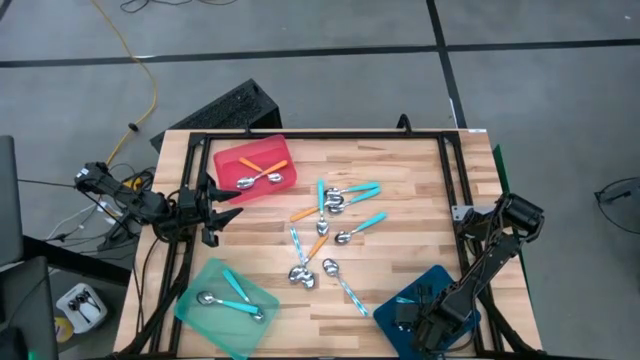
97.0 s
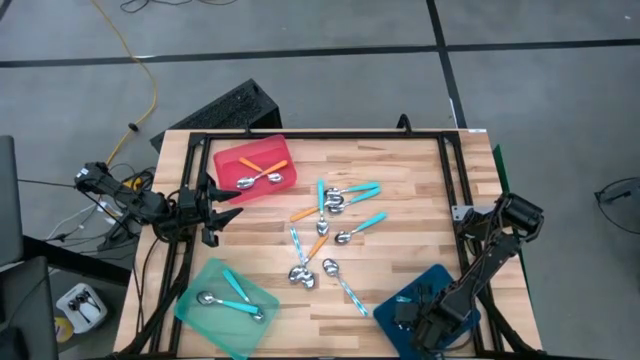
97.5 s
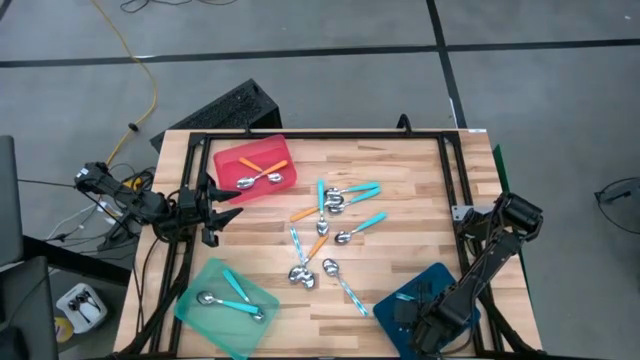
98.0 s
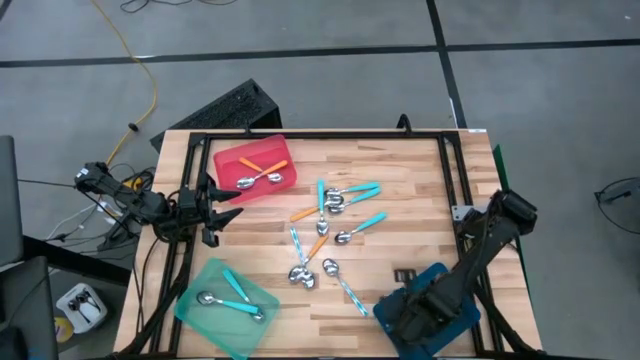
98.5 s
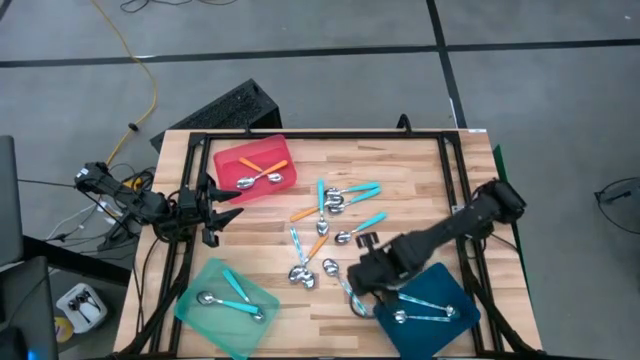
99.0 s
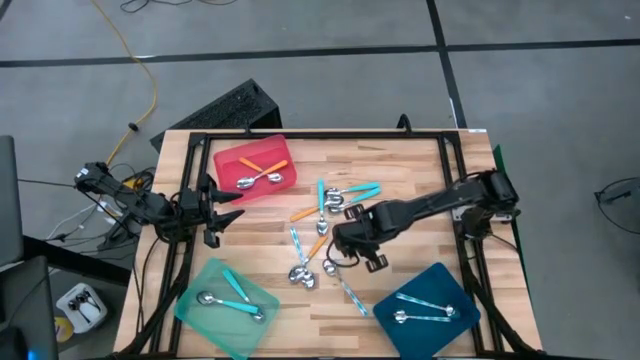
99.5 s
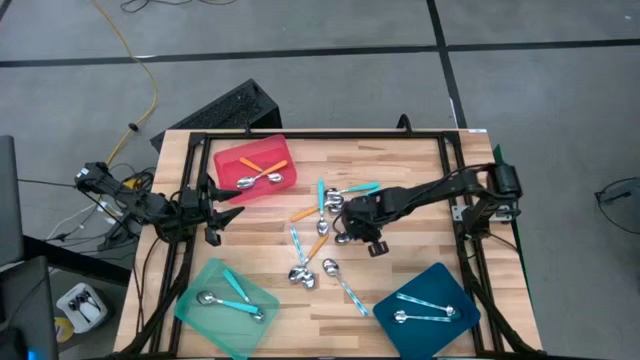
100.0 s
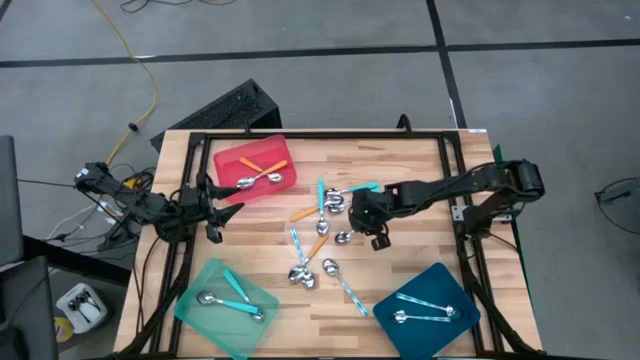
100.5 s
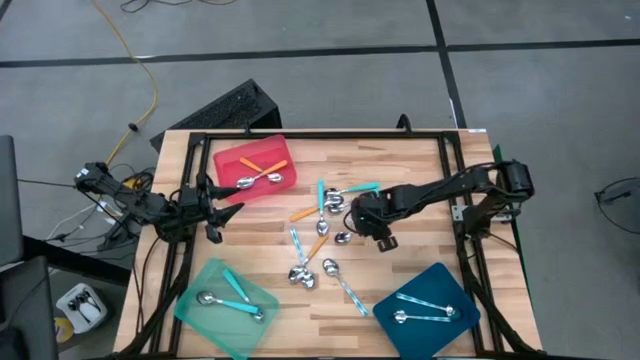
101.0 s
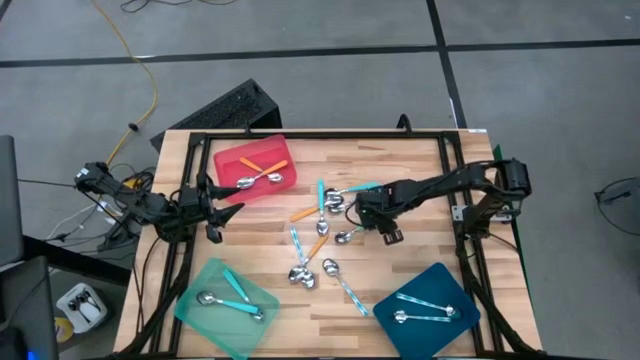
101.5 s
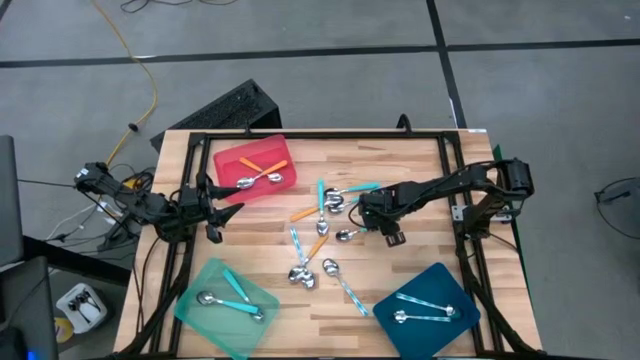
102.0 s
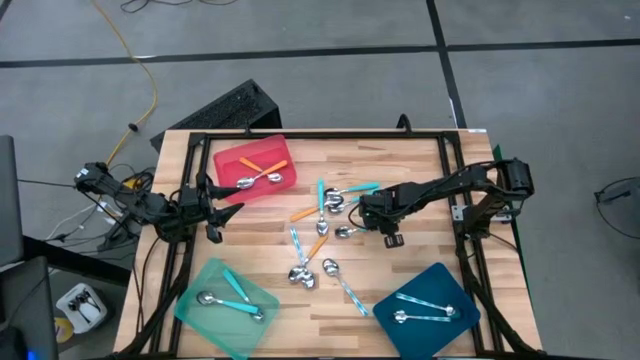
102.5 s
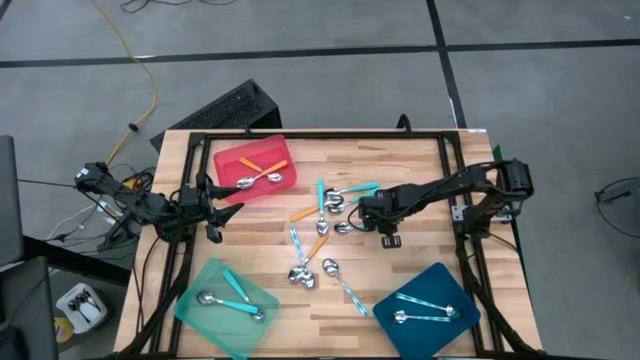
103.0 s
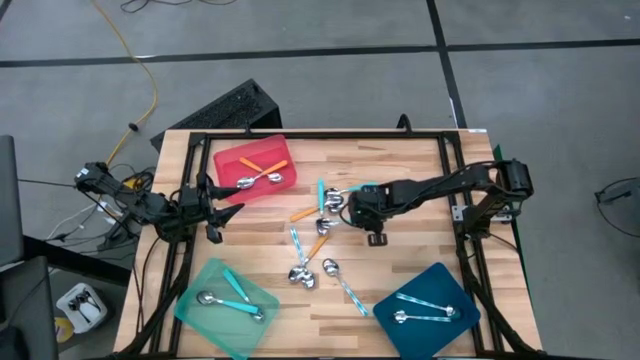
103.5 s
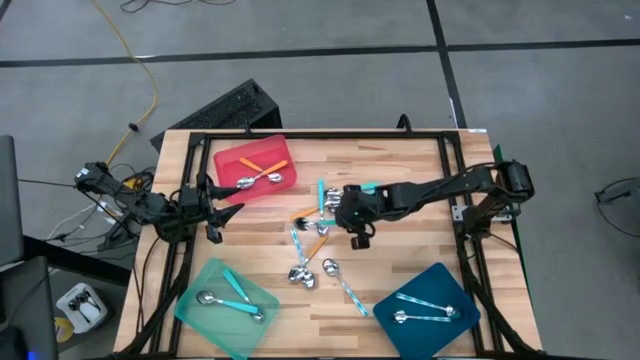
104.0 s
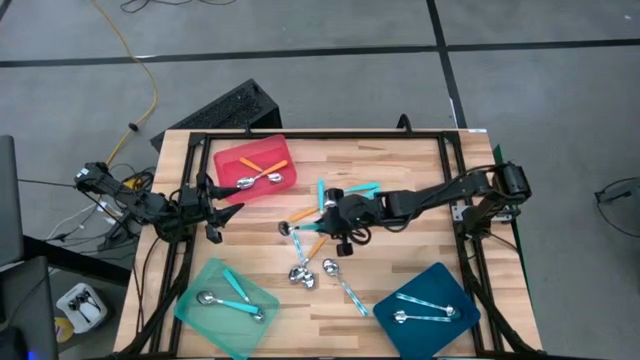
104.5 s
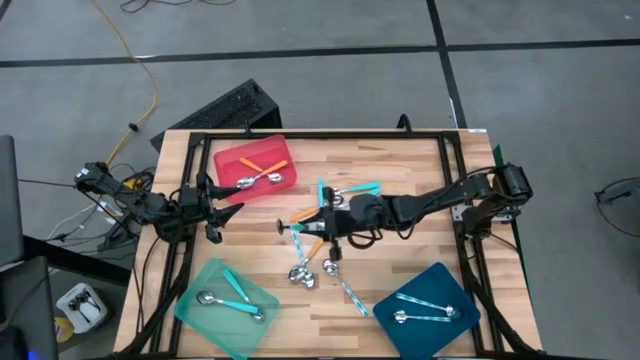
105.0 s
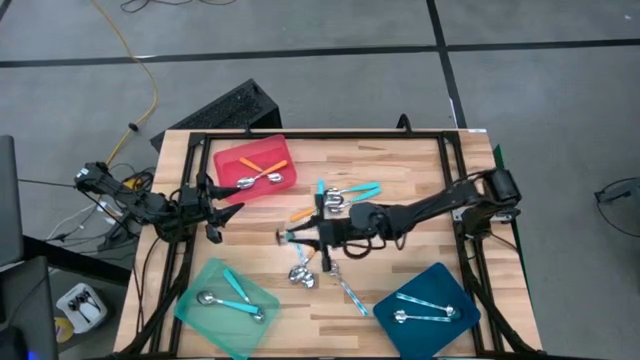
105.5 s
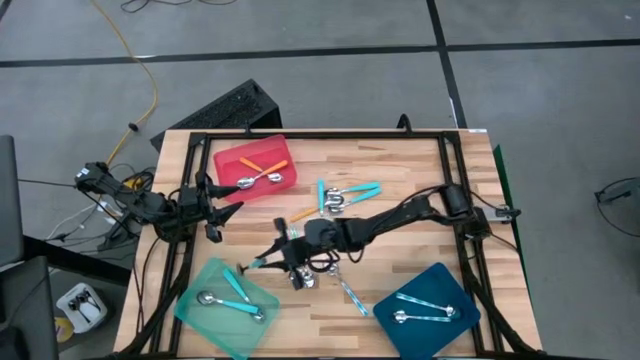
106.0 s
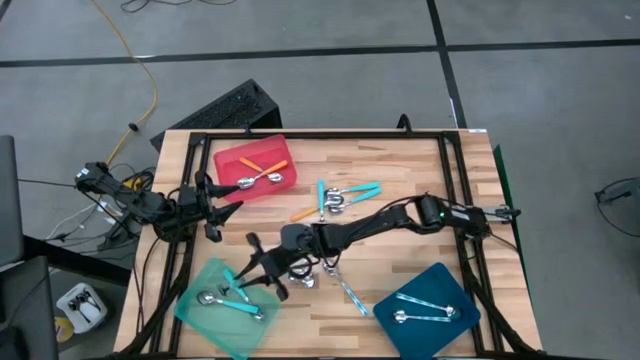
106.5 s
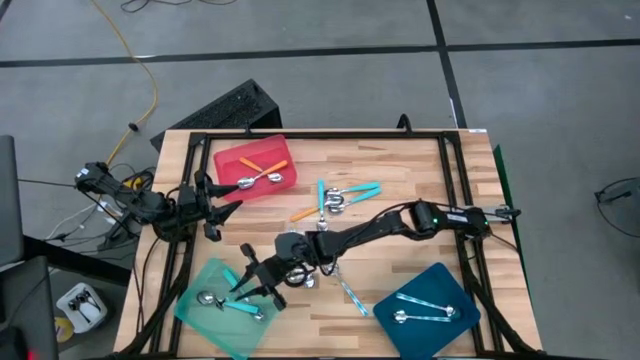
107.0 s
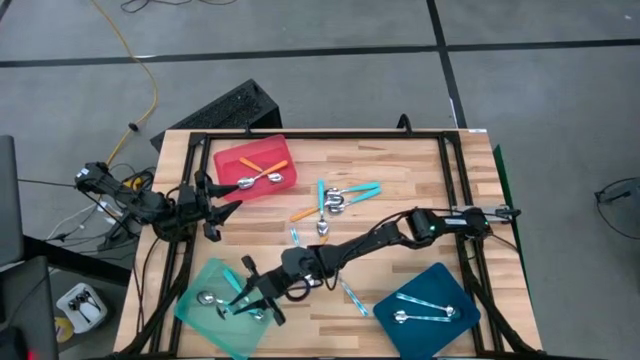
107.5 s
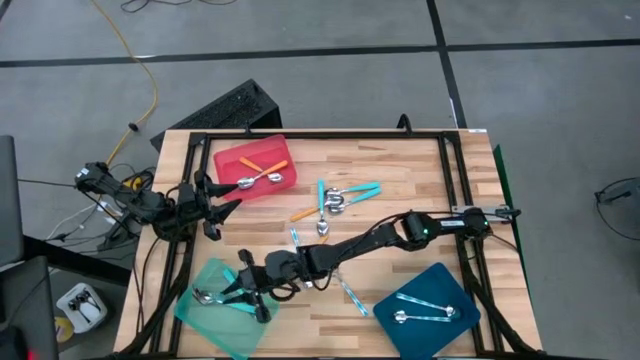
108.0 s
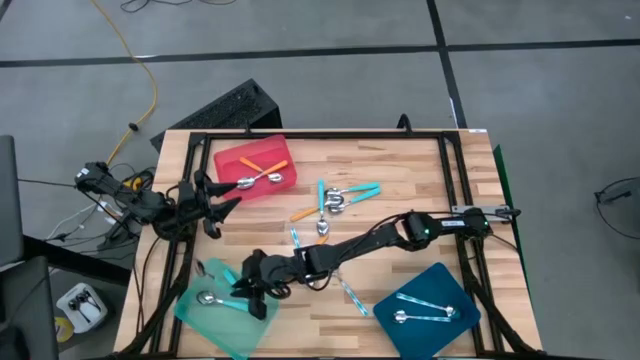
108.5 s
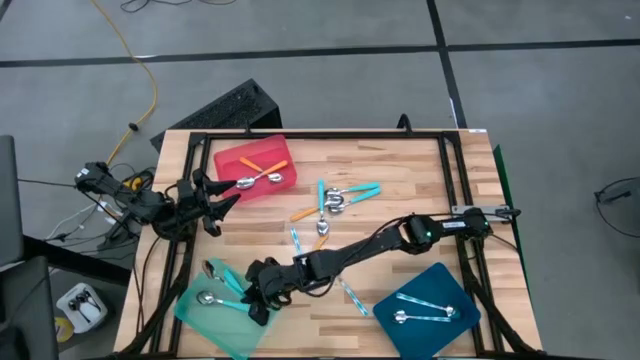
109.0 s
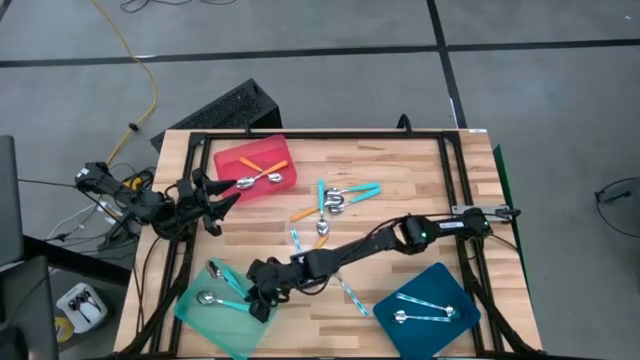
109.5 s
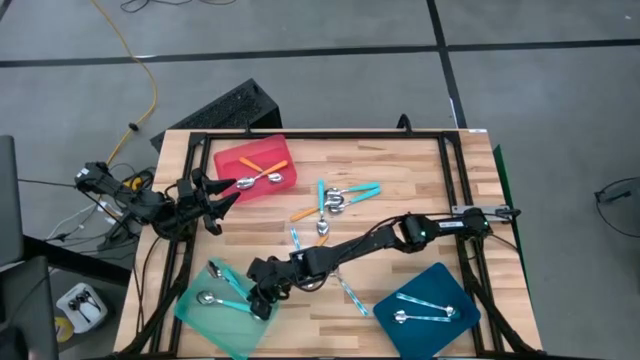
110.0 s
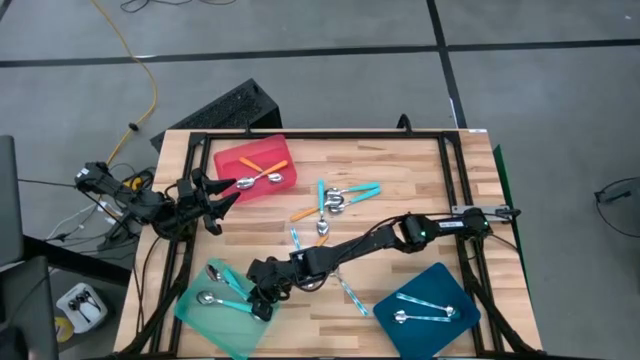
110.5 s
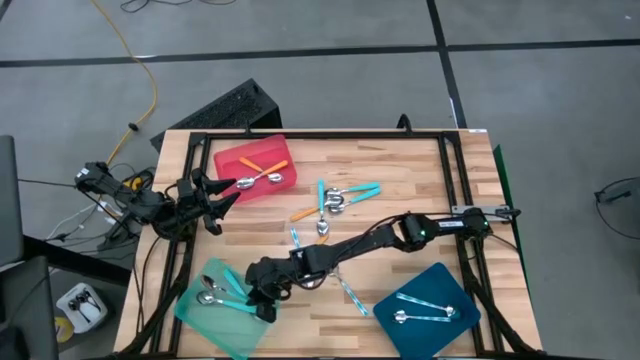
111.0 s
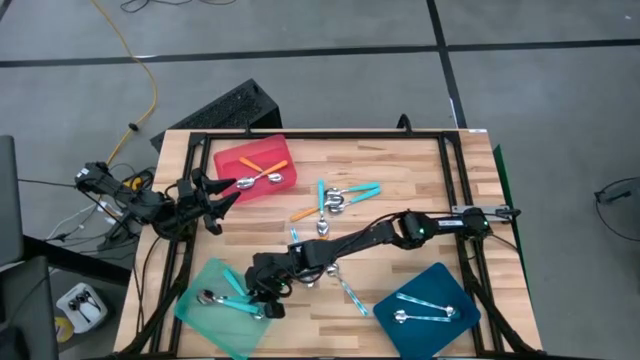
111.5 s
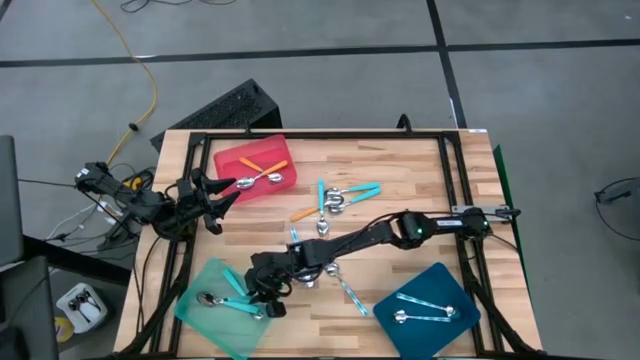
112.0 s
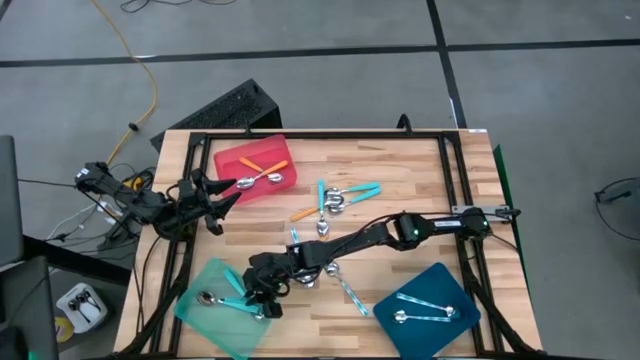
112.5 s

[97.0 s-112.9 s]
Task: Sort silverware by color (type)
Put the blue spoon into the light blue bin

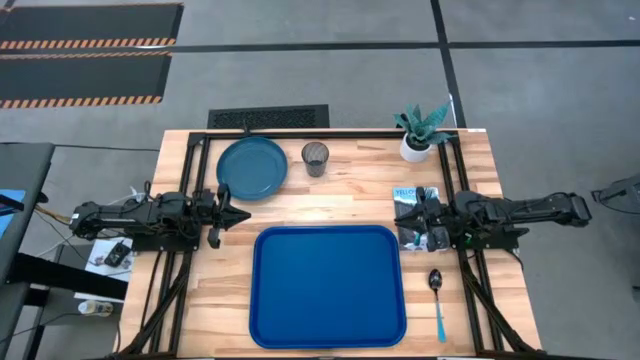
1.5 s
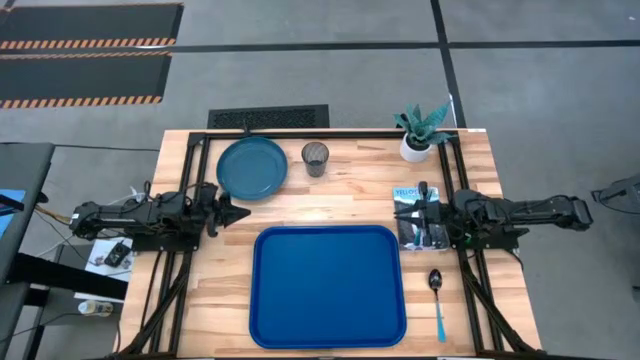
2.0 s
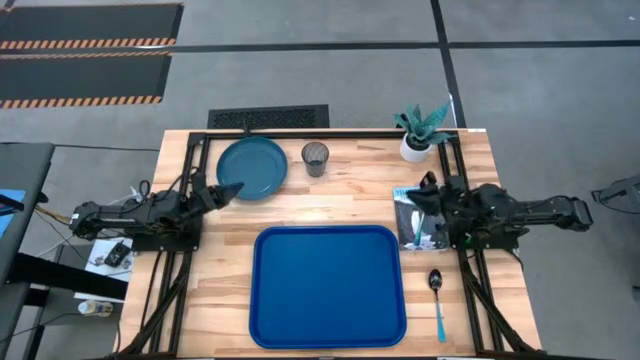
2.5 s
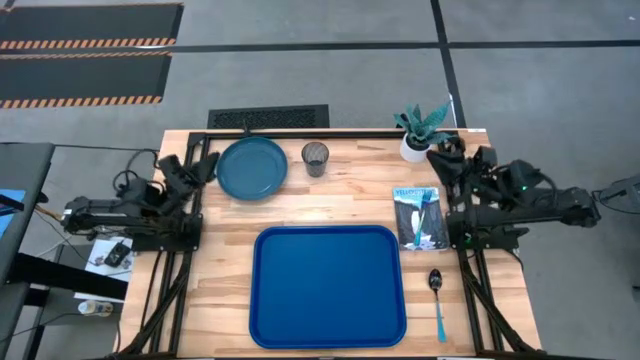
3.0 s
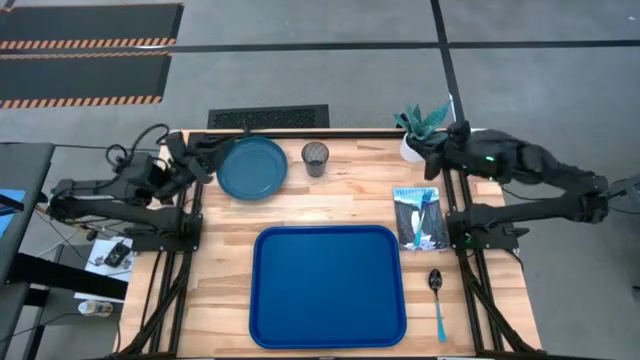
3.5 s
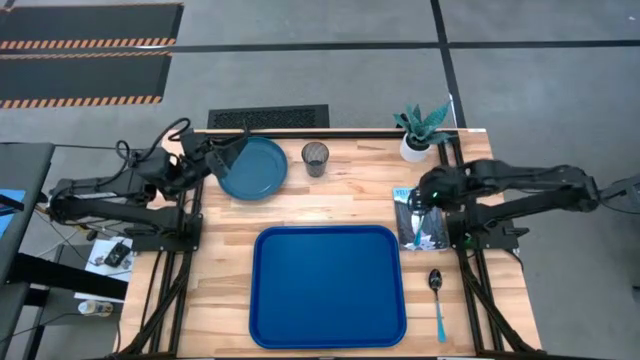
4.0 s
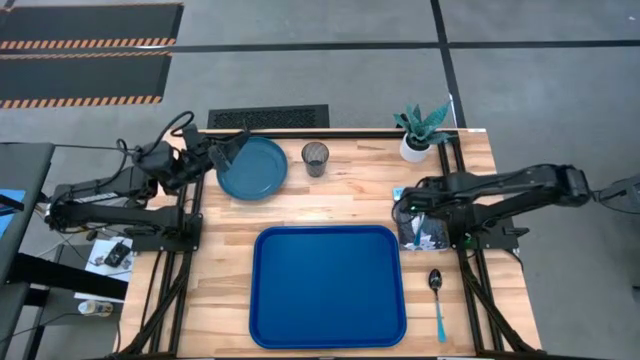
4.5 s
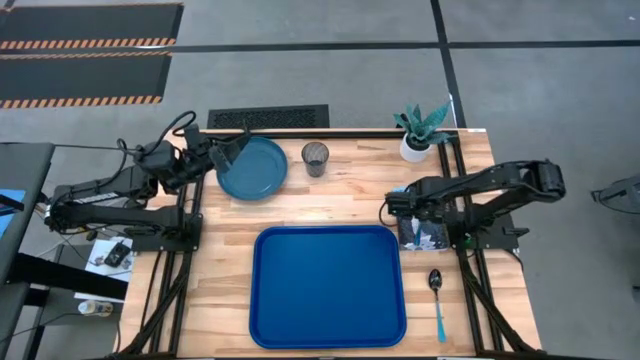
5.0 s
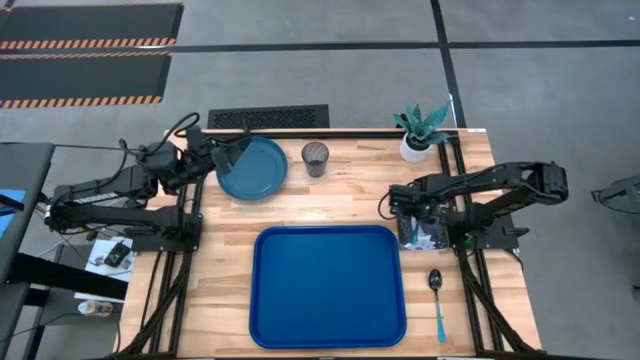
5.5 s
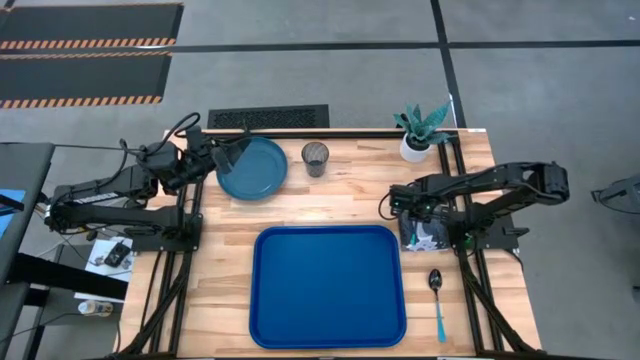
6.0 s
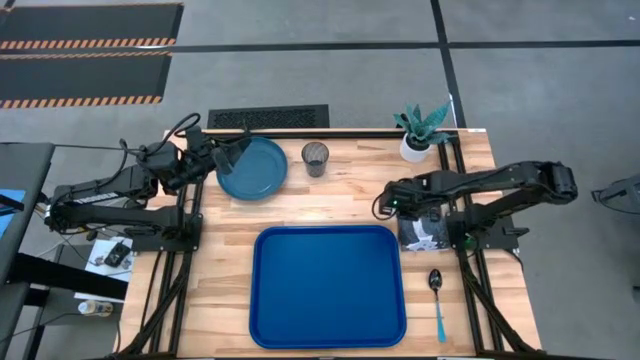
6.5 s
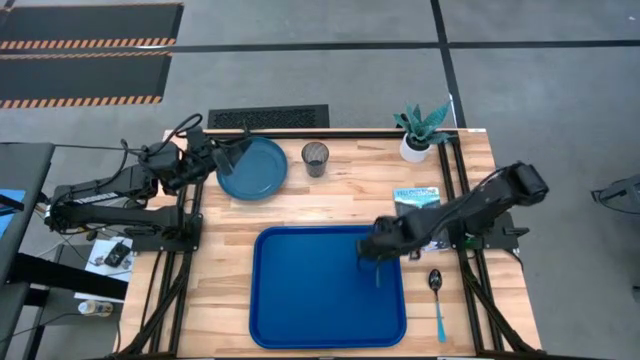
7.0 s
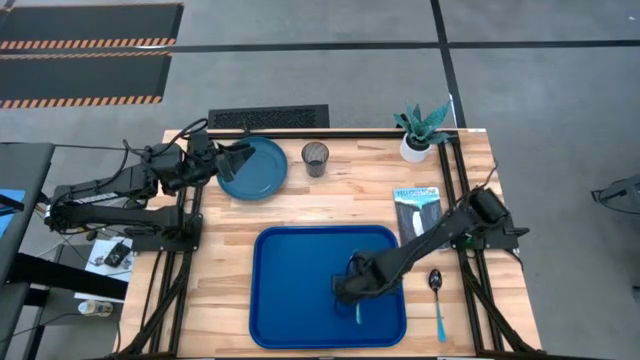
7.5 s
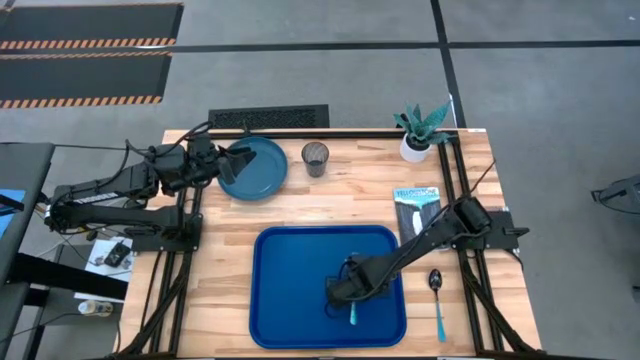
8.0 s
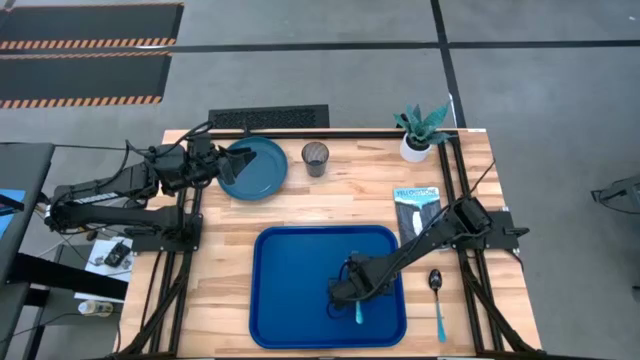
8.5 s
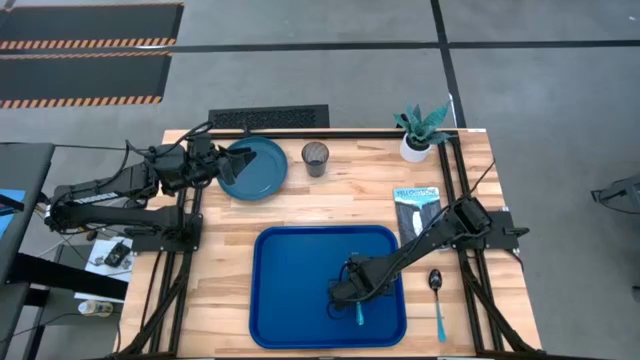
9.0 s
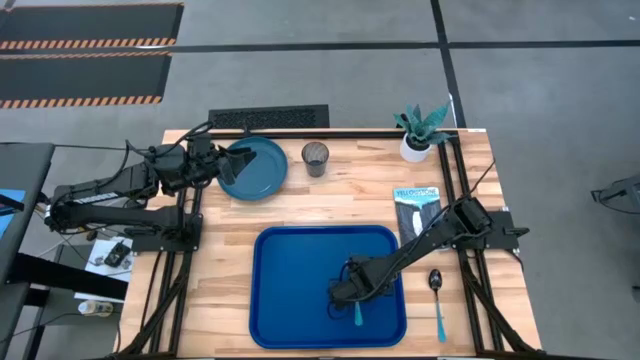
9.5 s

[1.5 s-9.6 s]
Task: Pick and place plate/cup/fork/spoon on tray
Put the purple fork on the blue tray
